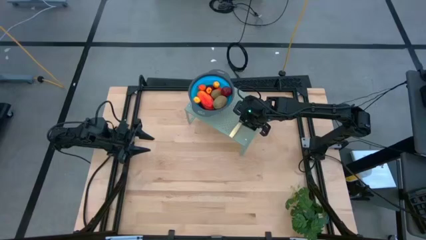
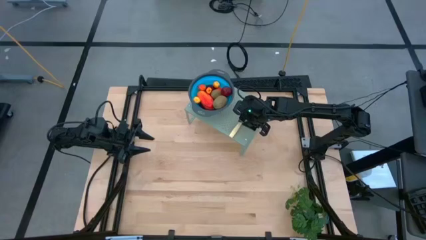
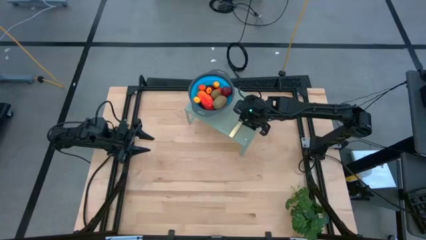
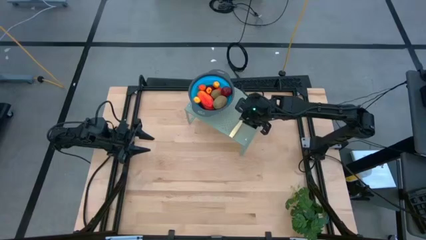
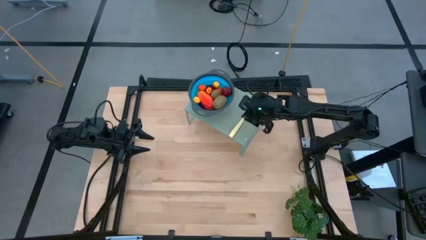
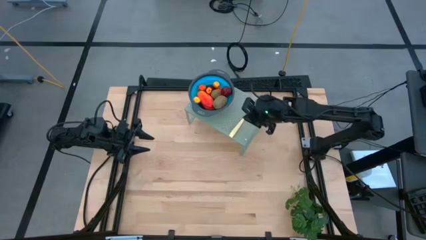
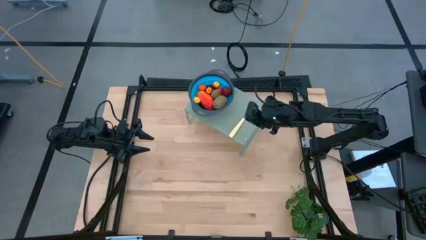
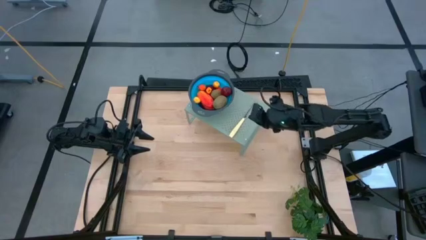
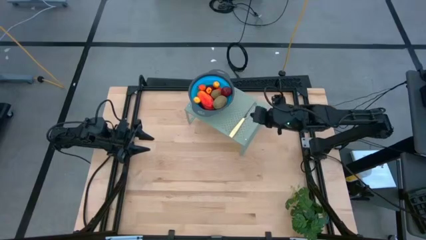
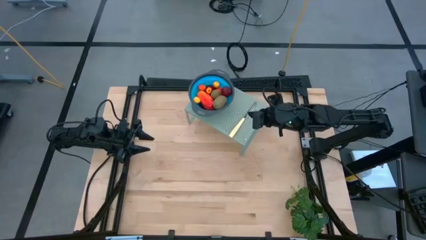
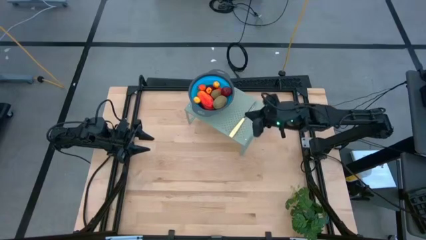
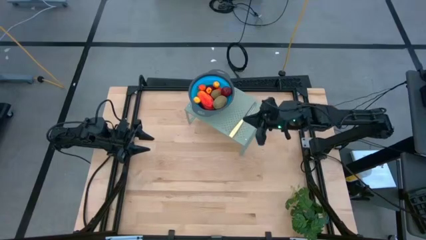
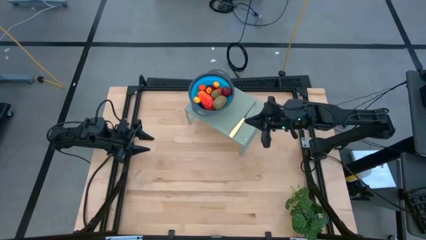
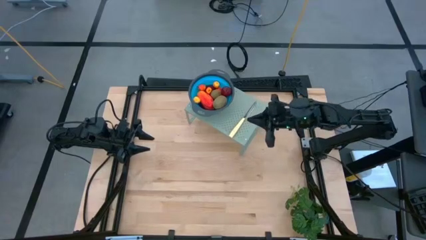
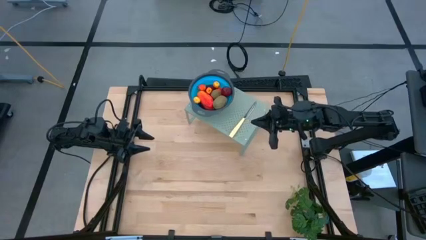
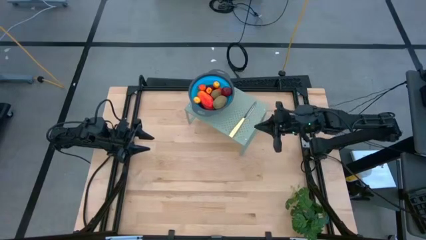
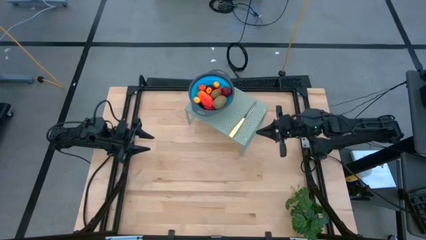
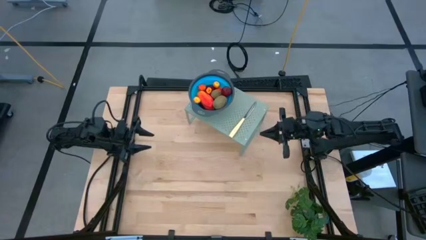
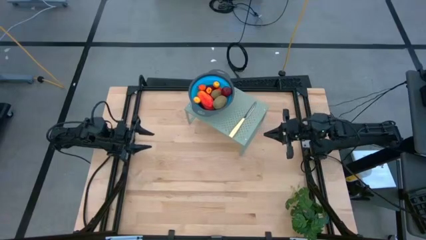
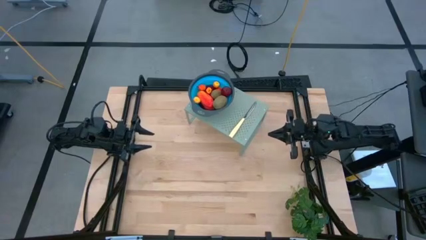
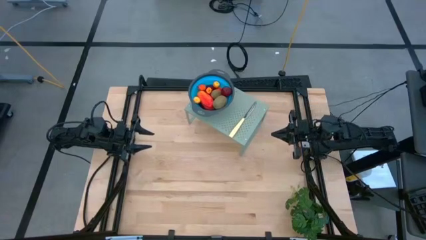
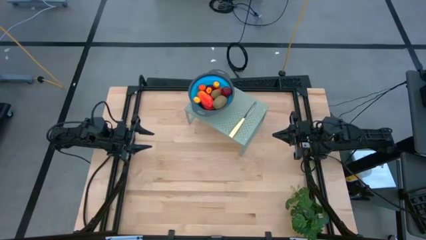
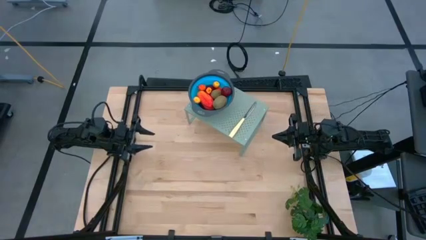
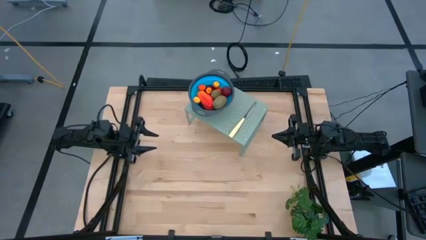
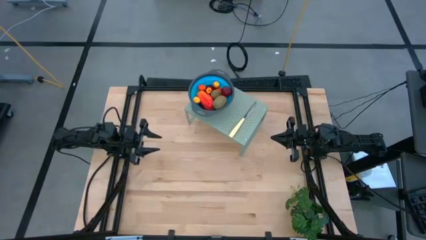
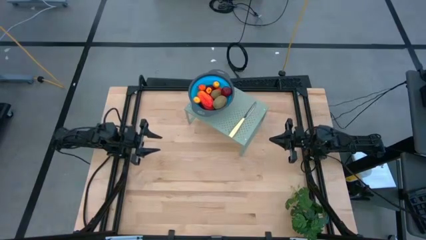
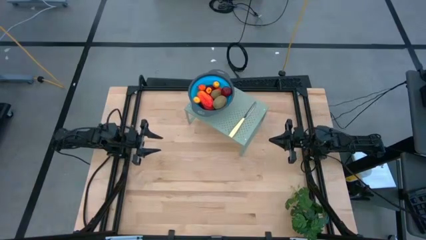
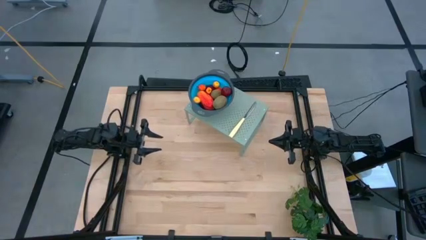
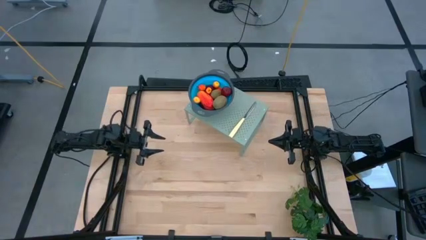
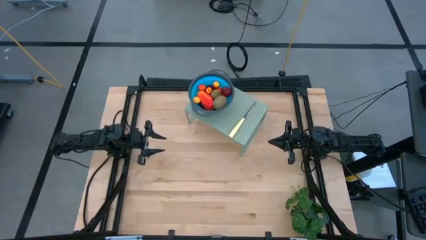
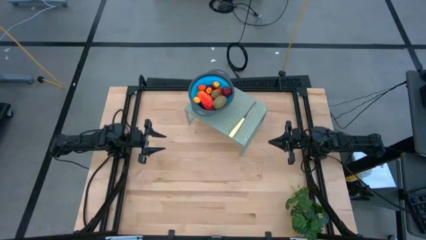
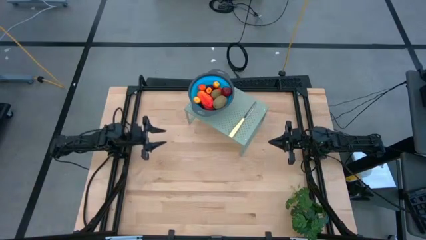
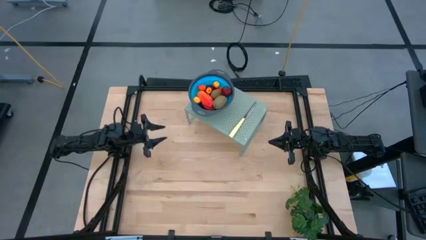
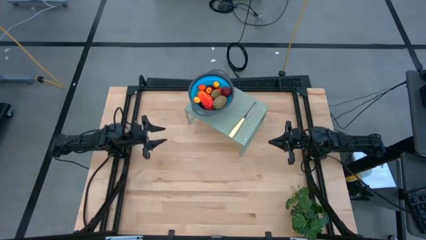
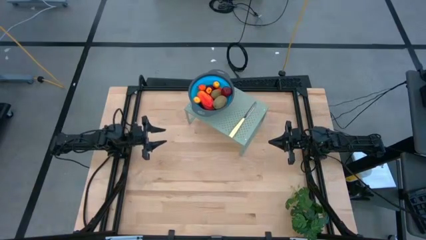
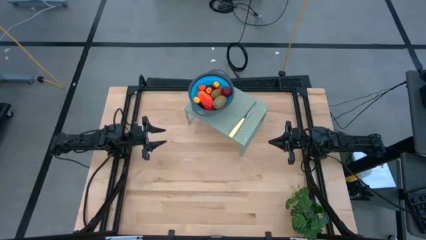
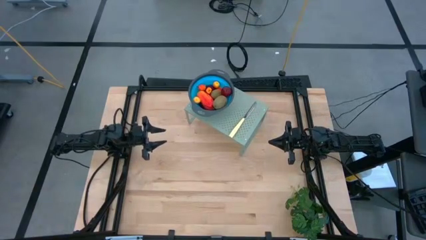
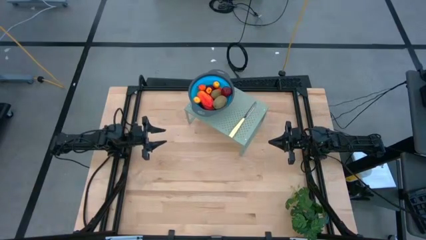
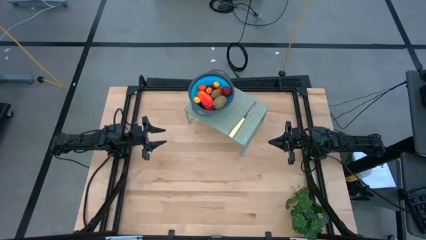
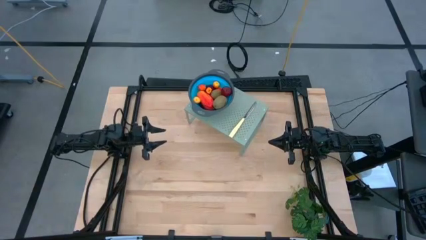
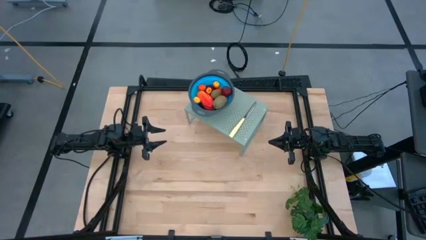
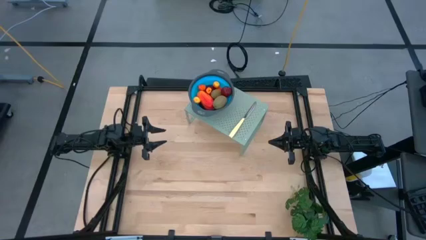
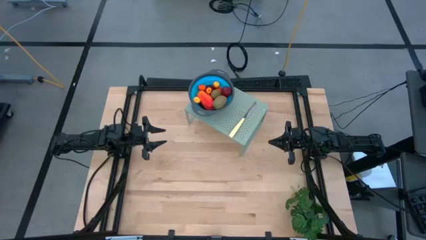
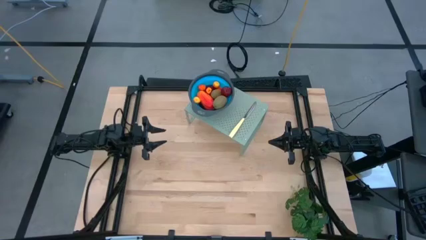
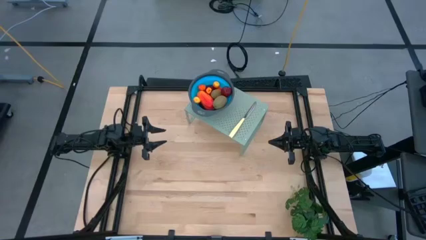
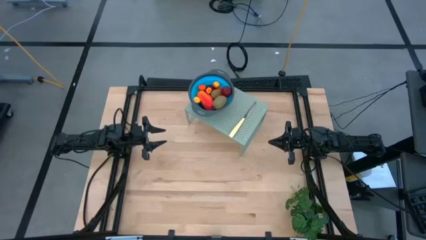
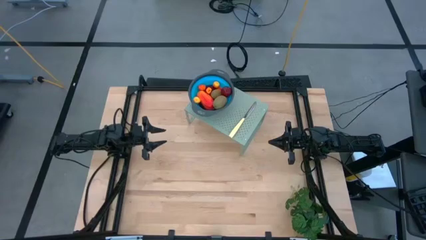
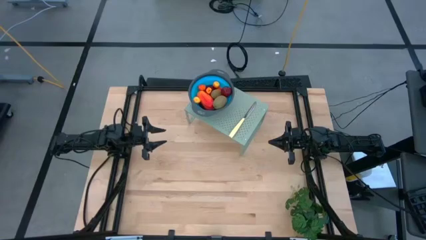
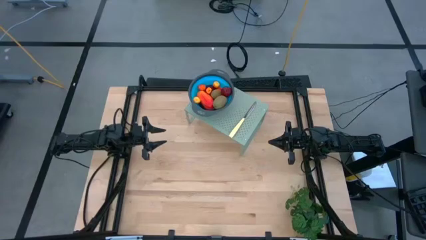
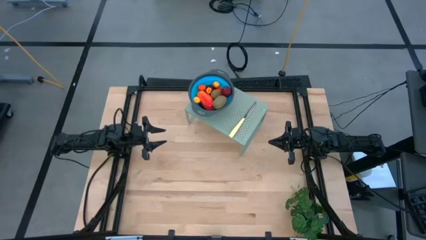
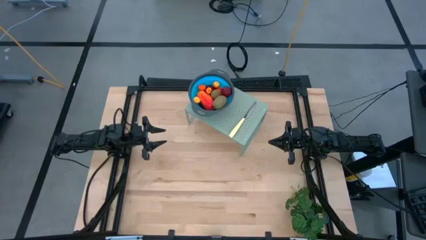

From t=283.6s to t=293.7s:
Task: Pick & Place Fruit
Return to Home Position
